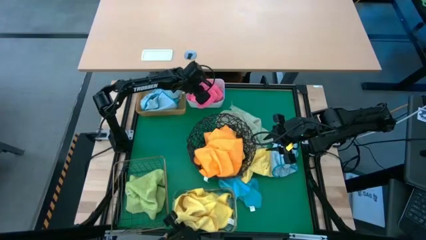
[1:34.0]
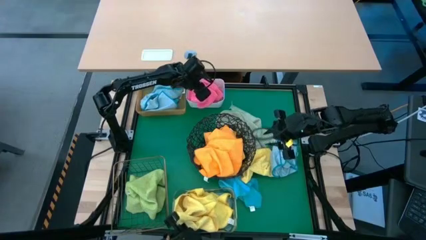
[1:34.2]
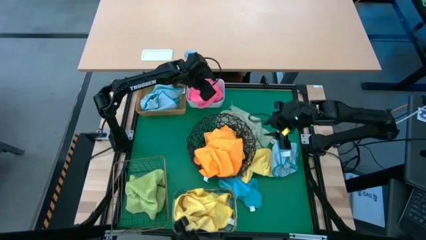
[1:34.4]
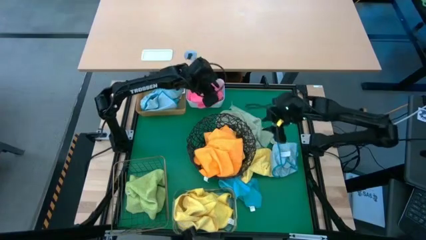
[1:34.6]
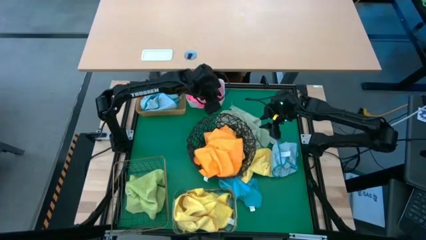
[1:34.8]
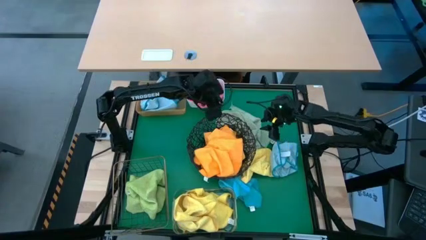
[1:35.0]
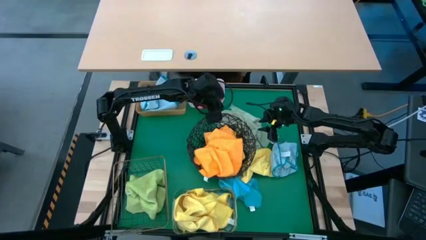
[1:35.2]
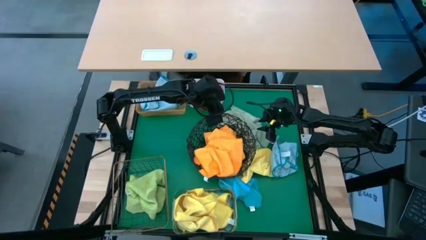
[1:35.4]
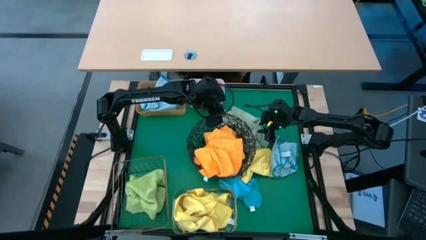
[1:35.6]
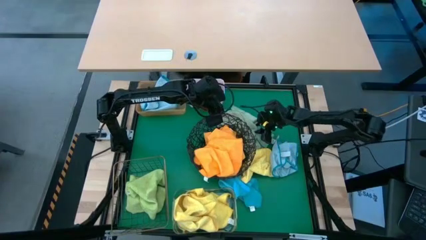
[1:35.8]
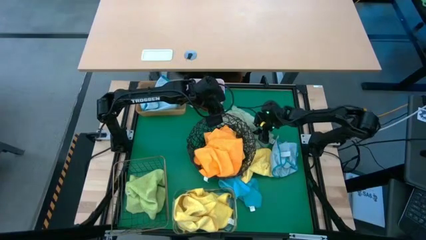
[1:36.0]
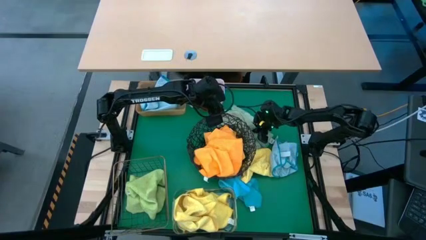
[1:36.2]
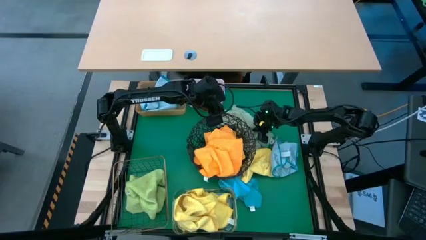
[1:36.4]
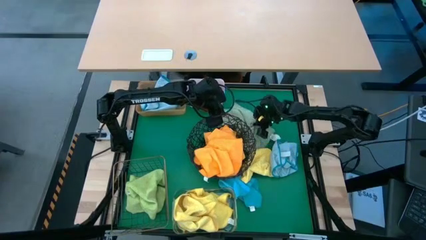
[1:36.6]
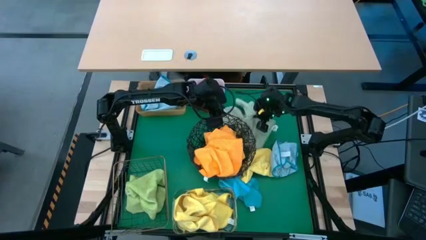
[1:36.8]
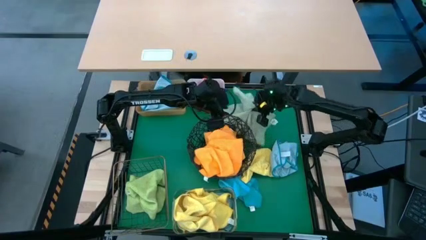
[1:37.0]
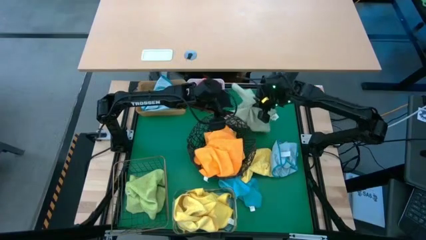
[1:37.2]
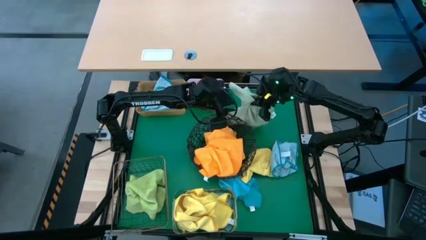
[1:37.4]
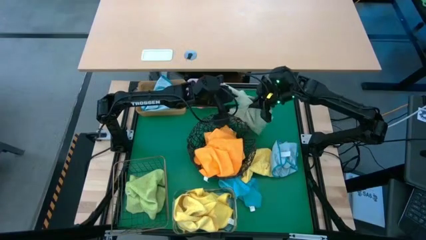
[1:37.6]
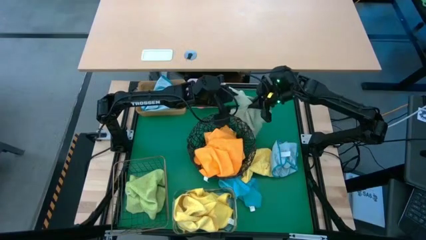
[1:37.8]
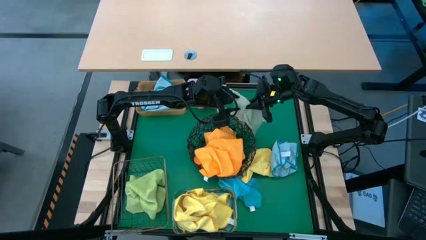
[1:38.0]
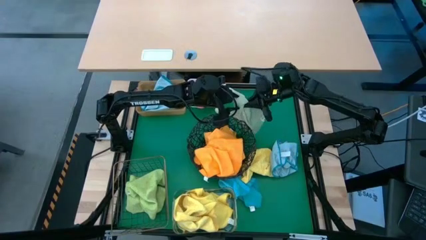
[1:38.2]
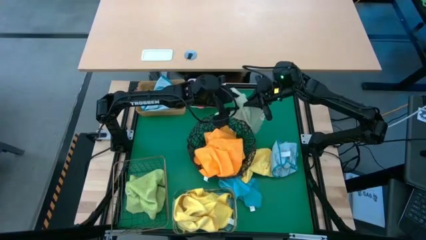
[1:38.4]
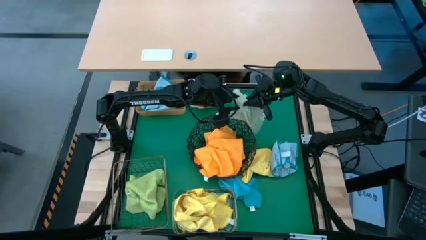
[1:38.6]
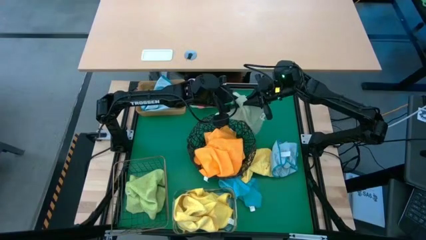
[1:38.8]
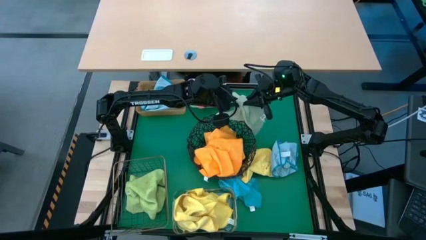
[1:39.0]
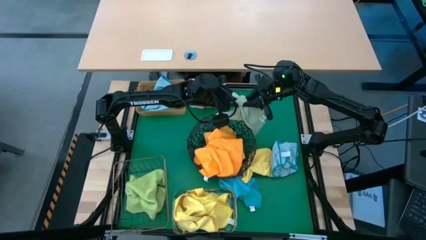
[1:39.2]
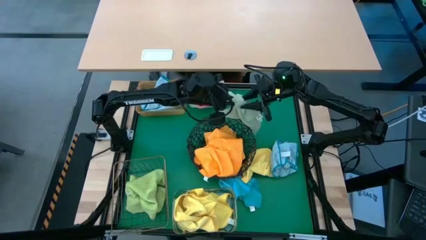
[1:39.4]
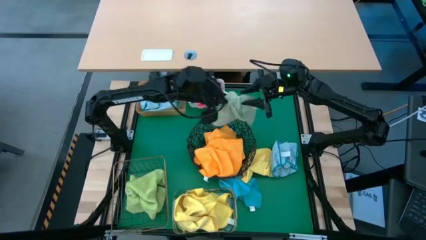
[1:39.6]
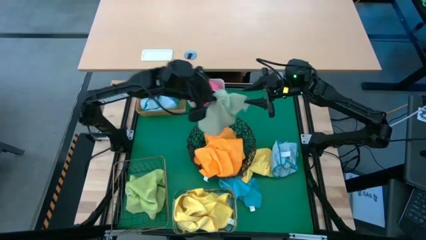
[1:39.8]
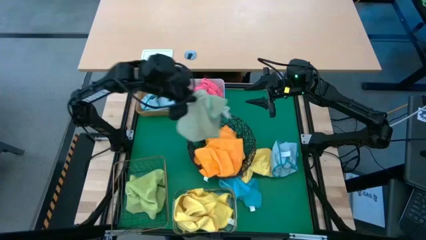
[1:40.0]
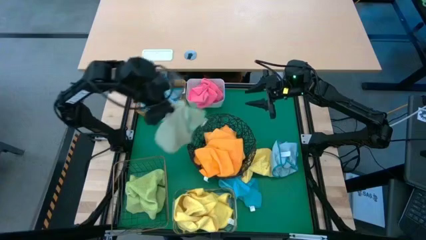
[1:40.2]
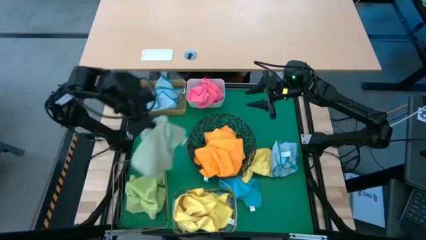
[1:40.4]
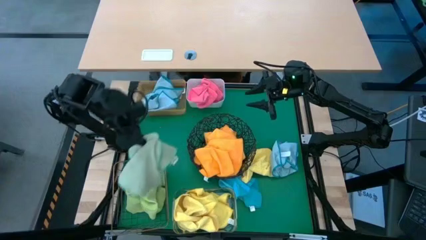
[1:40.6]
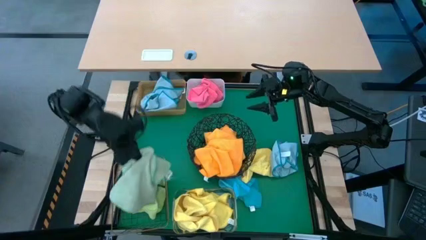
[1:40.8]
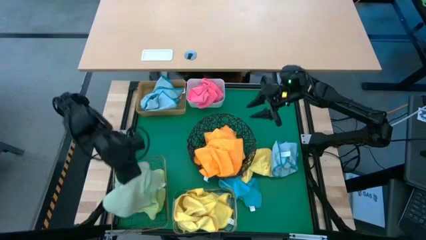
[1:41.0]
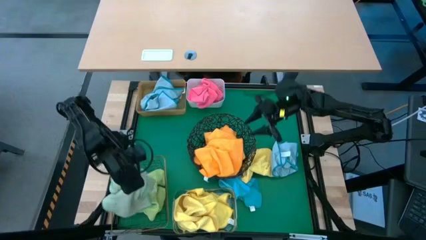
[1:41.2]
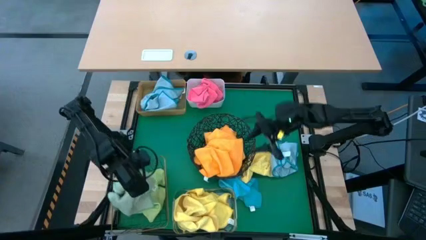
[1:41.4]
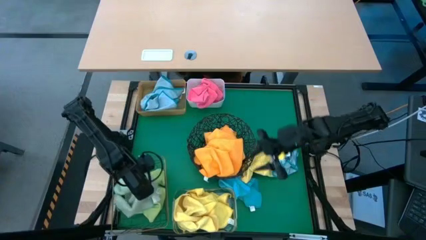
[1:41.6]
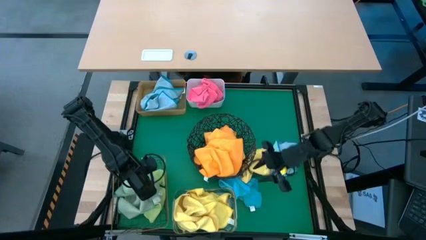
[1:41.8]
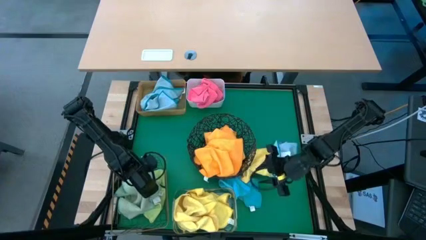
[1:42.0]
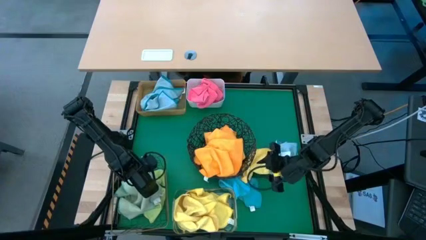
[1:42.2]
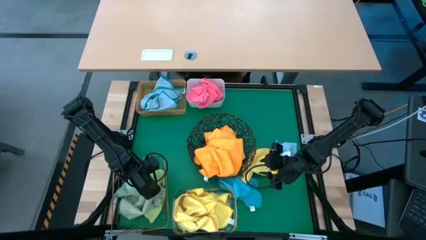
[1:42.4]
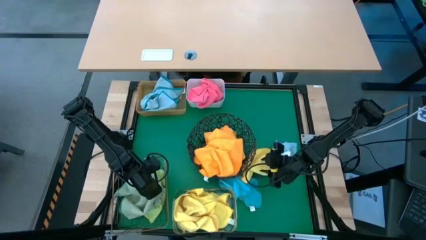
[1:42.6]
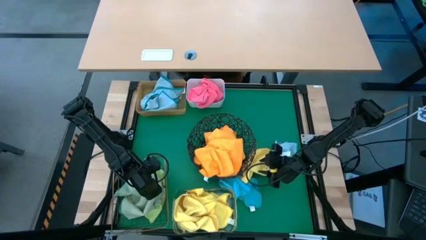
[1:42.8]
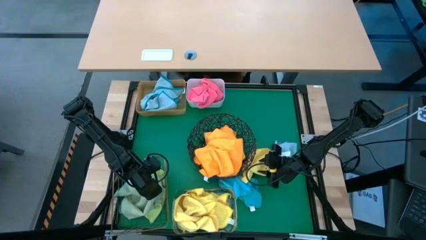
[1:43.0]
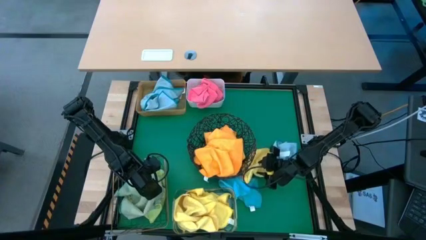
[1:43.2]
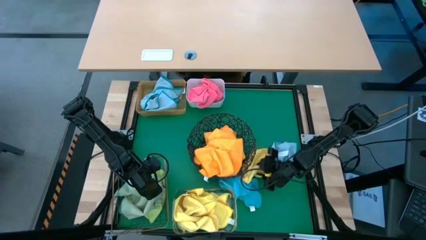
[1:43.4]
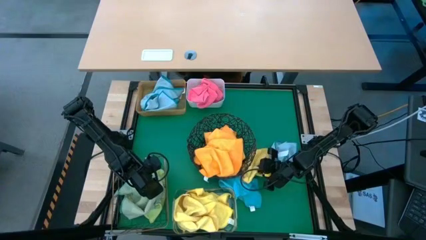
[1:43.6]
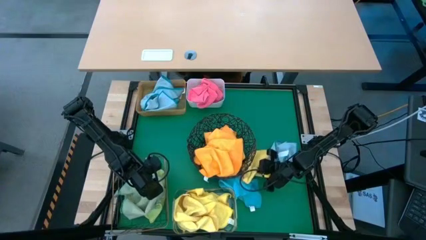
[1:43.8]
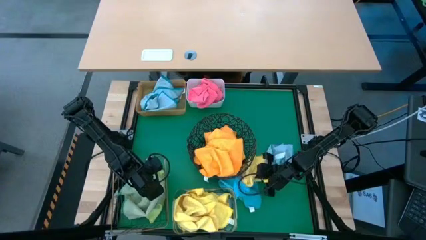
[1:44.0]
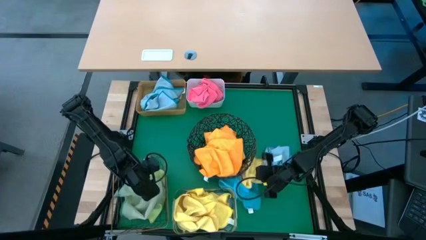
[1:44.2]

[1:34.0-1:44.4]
Task: Sort microfiber towel by color & place in baskets
Put the green towel into the gold wire basket

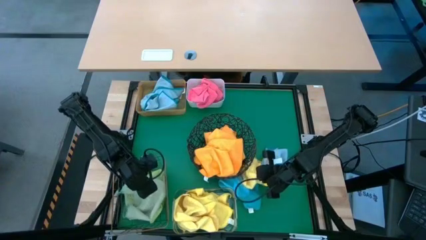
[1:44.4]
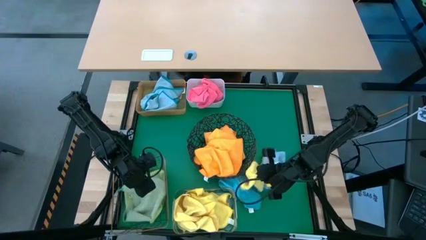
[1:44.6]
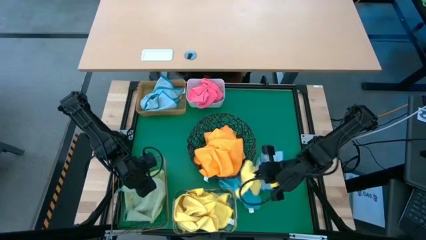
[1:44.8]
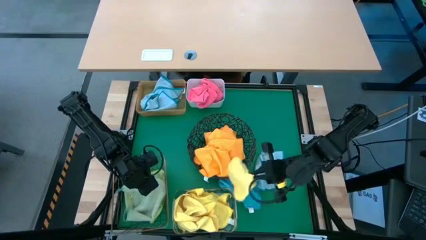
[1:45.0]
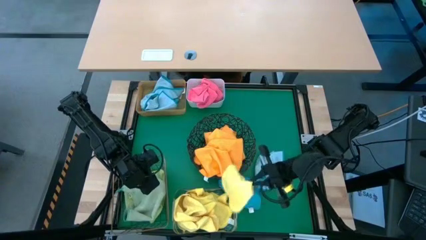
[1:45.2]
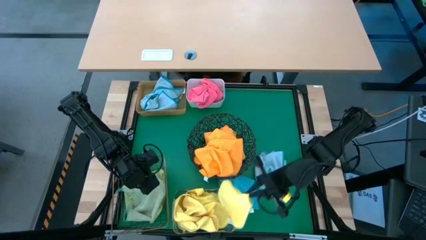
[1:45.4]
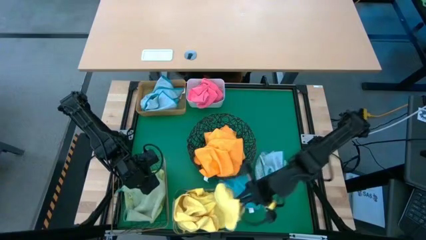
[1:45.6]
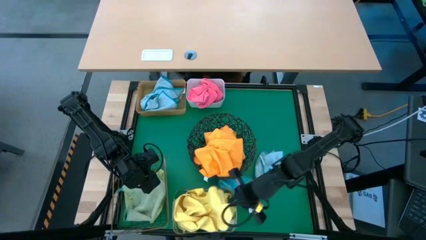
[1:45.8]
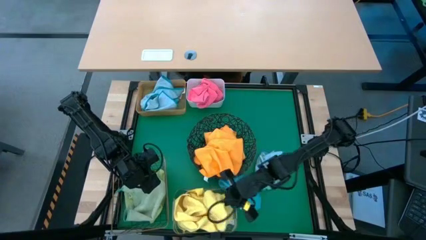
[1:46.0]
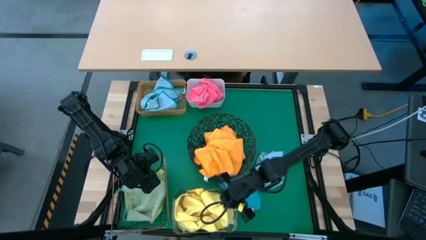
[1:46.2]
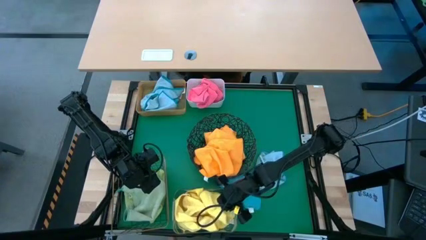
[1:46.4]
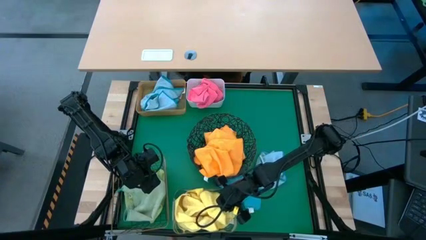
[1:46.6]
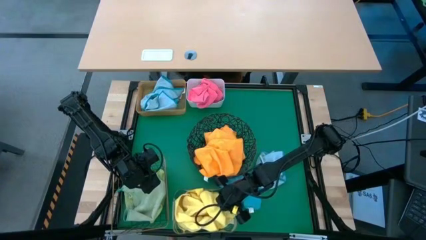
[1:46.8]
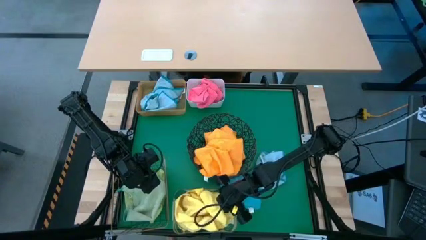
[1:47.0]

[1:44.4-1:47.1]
Put the yellow towel into the transparent bin

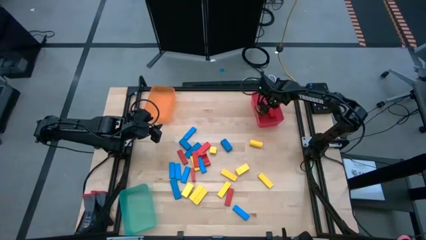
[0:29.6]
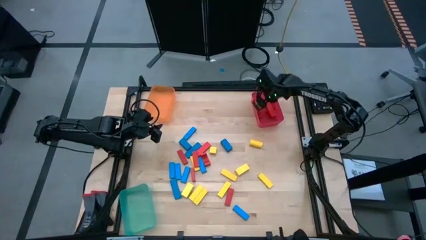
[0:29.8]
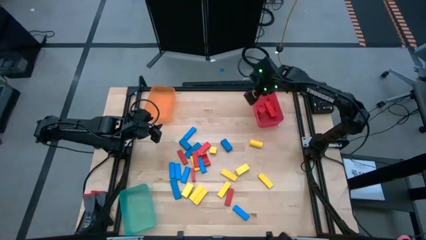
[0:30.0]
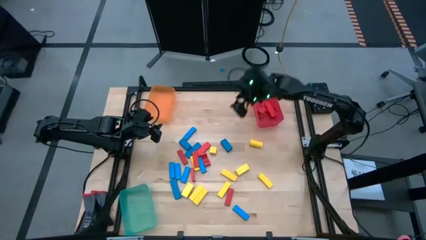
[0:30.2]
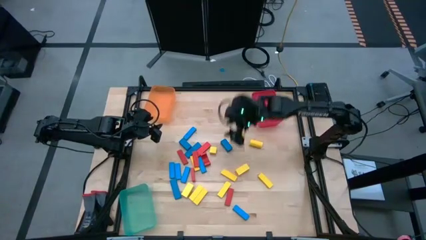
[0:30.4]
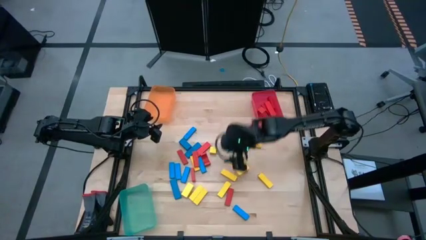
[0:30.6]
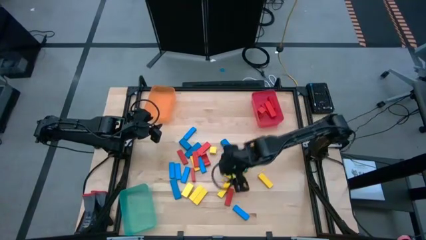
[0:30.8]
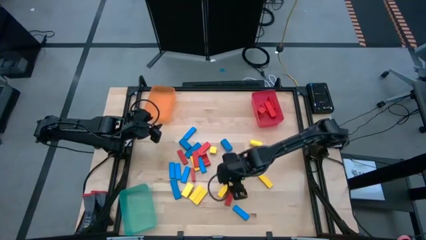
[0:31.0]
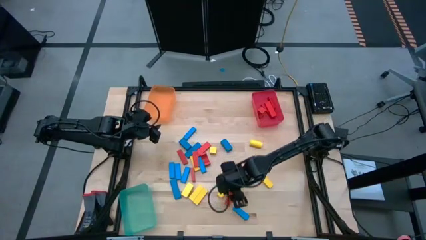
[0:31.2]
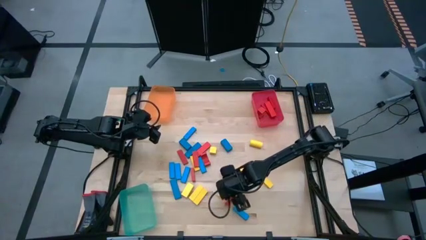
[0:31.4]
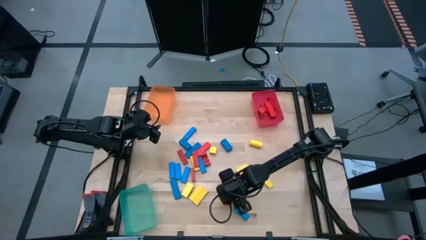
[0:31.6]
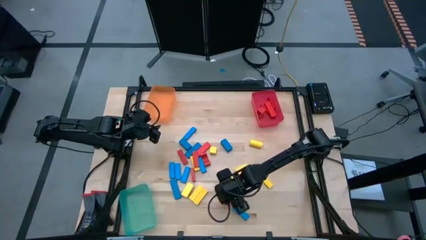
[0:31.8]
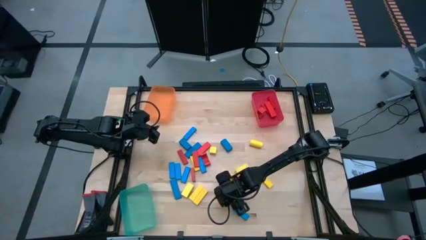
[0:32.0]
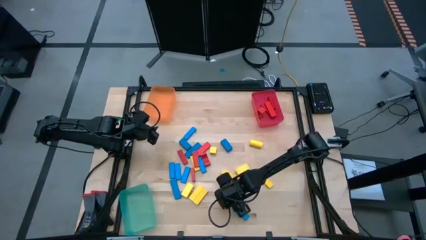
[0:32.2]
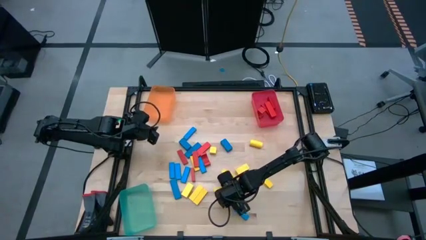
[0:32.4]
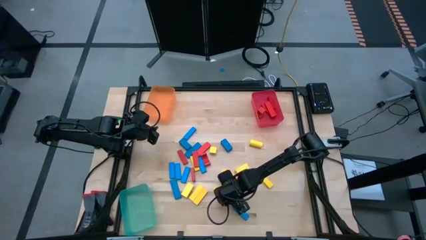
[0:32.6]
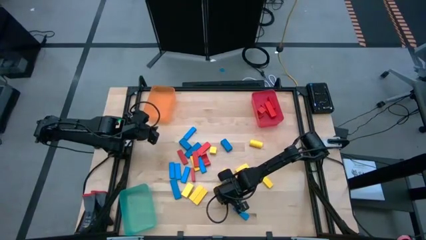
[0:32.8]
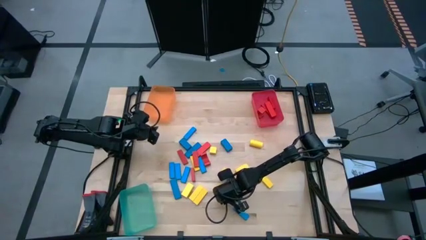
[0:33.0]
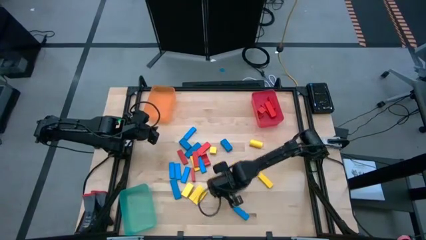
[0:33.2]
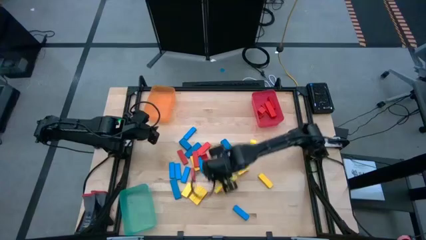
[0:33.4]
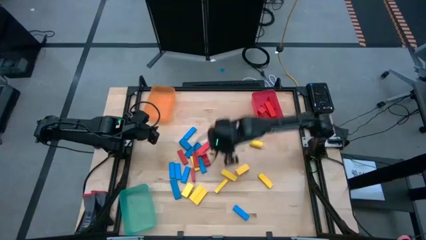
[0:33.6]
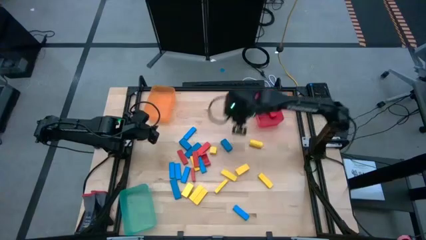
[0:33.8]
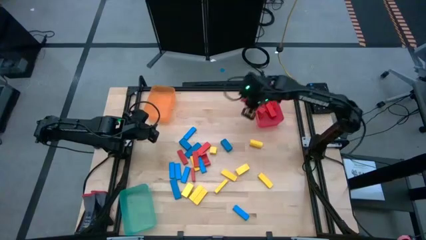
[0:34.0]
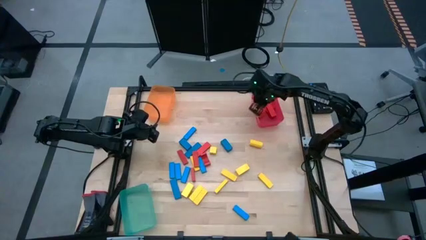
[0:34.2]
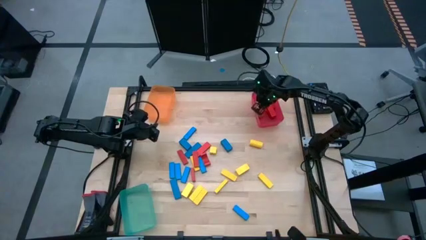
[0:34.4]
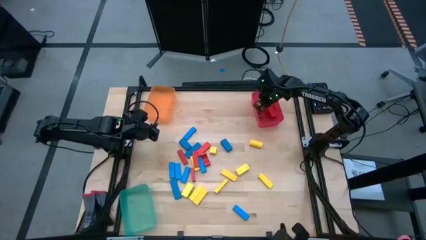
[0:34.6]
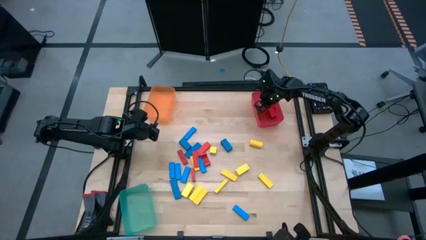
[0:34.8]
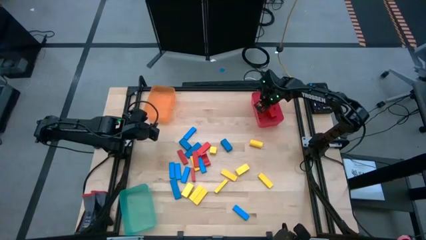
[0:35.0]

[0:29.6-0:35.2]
Task: Sort blocks
Put the red block into the red transparent bin
